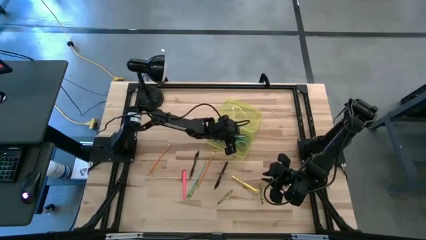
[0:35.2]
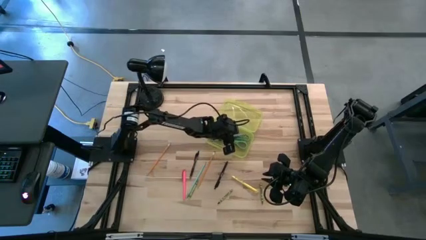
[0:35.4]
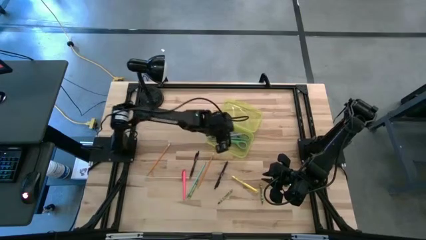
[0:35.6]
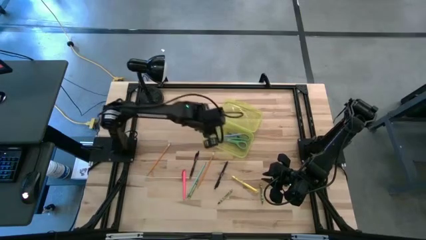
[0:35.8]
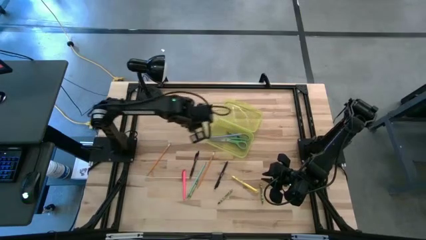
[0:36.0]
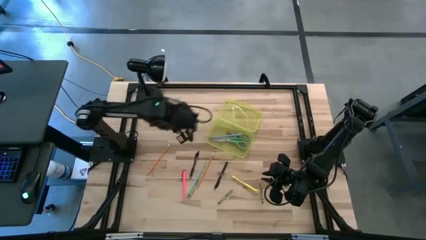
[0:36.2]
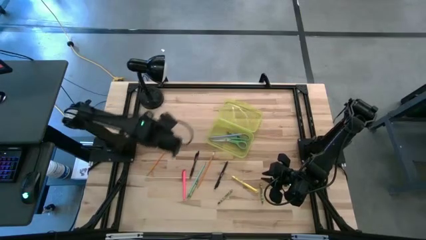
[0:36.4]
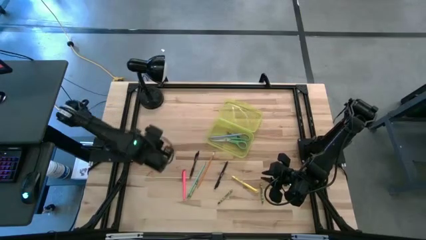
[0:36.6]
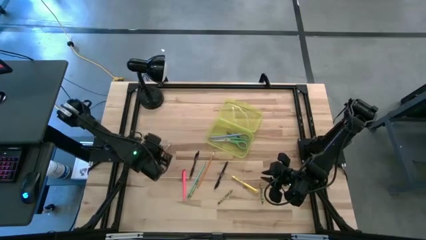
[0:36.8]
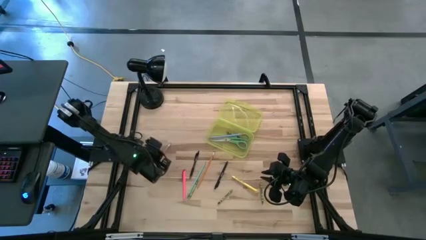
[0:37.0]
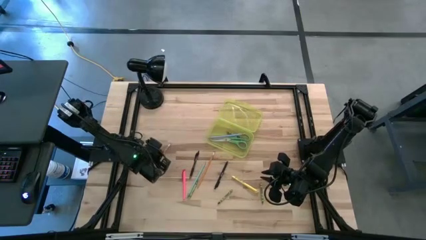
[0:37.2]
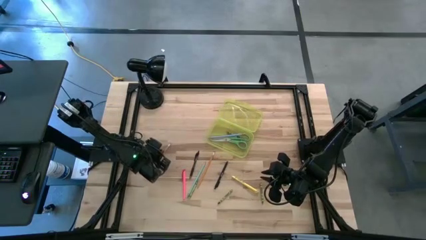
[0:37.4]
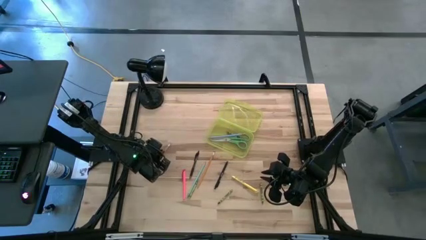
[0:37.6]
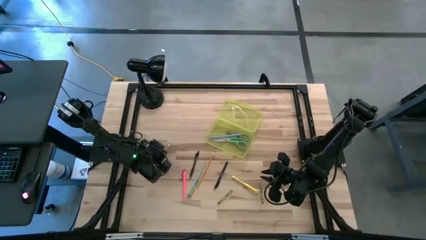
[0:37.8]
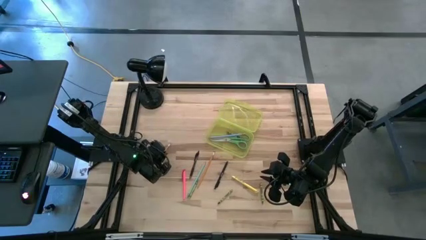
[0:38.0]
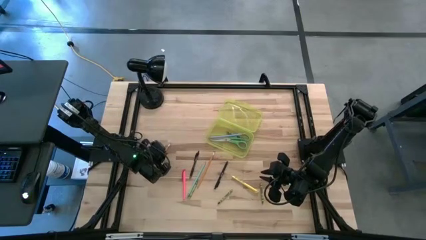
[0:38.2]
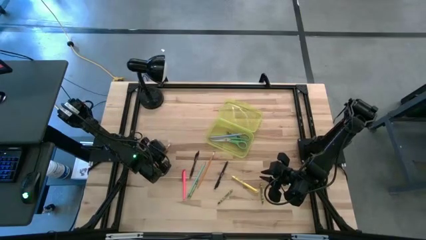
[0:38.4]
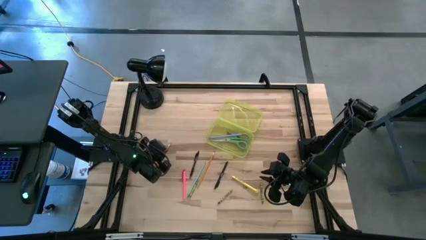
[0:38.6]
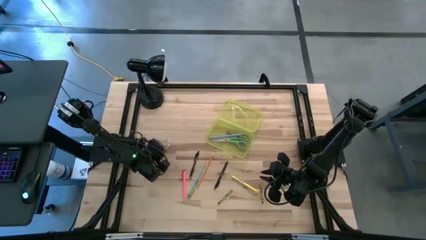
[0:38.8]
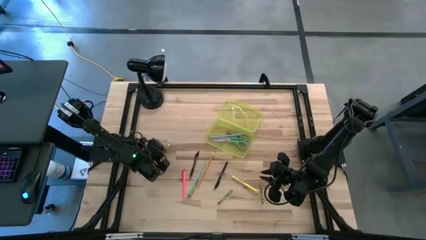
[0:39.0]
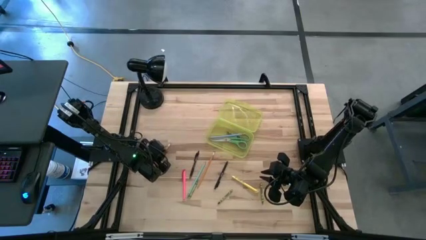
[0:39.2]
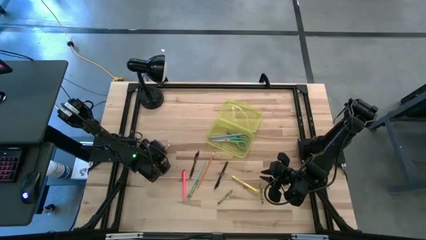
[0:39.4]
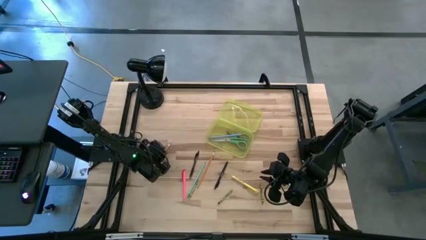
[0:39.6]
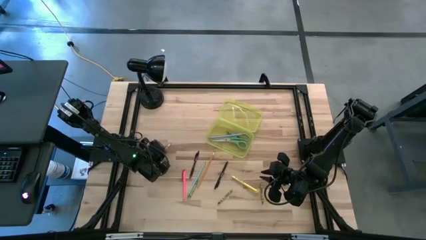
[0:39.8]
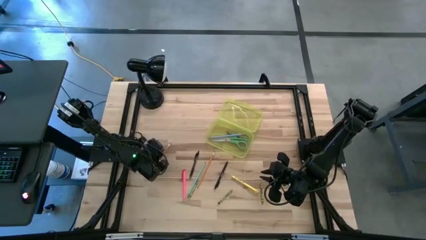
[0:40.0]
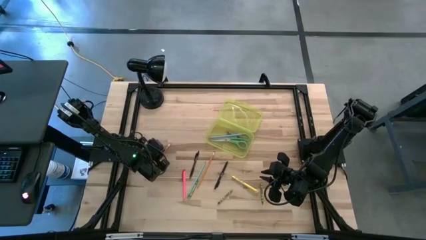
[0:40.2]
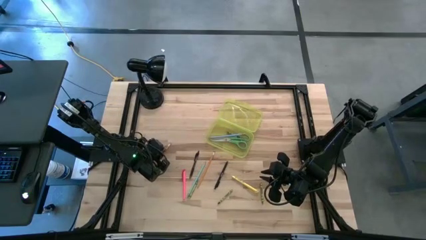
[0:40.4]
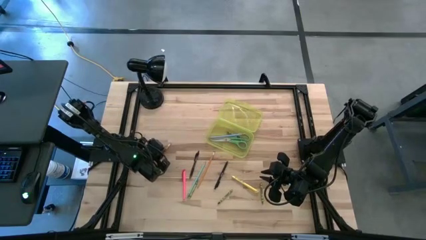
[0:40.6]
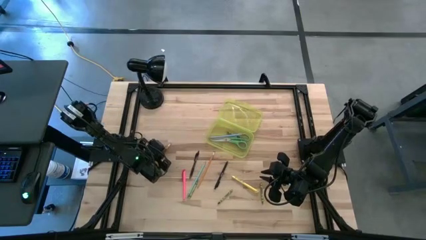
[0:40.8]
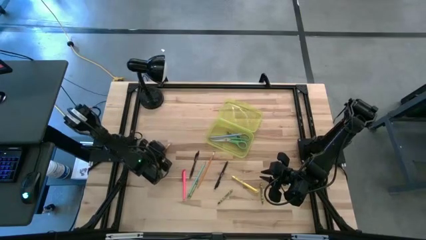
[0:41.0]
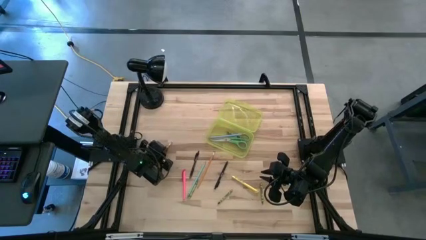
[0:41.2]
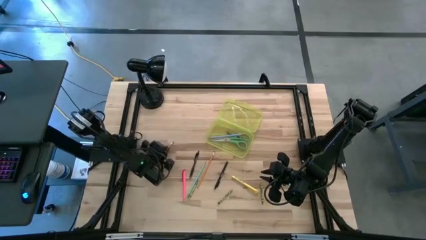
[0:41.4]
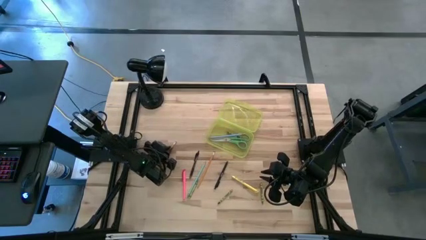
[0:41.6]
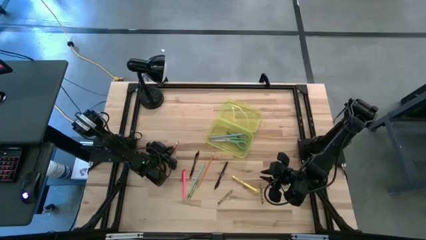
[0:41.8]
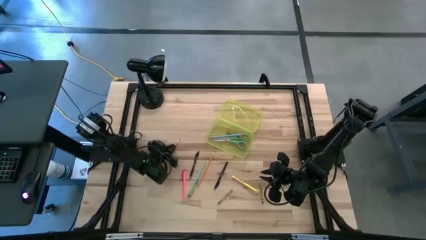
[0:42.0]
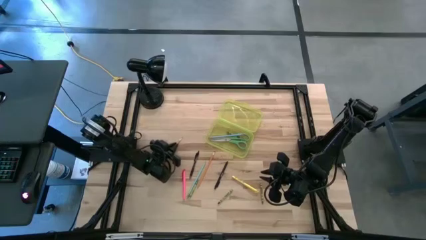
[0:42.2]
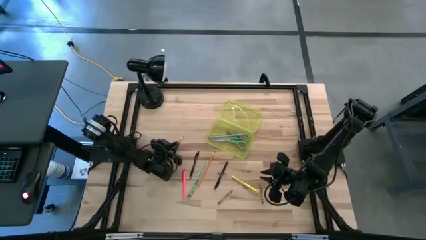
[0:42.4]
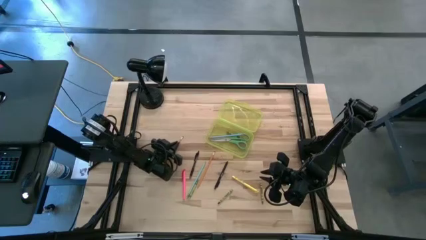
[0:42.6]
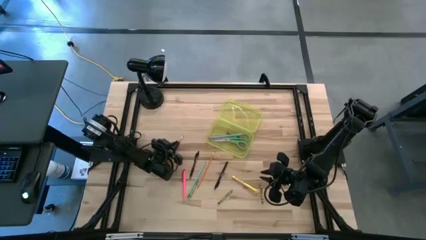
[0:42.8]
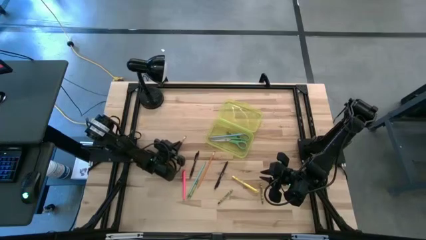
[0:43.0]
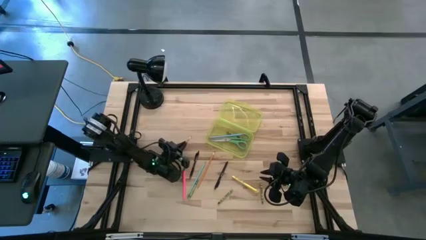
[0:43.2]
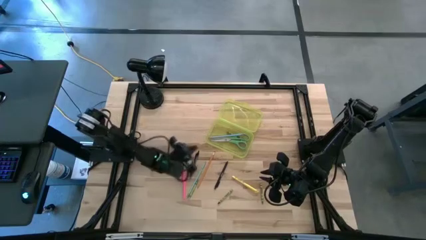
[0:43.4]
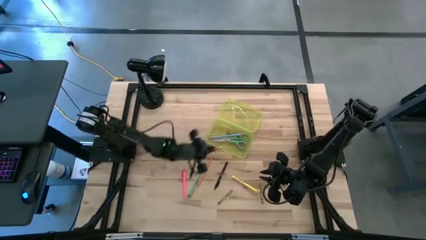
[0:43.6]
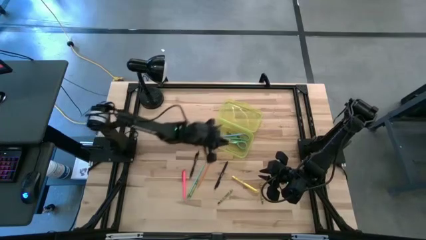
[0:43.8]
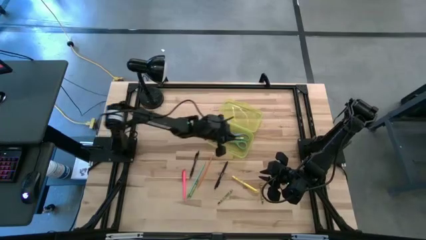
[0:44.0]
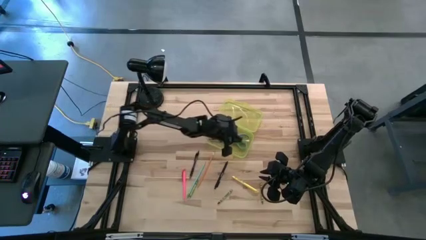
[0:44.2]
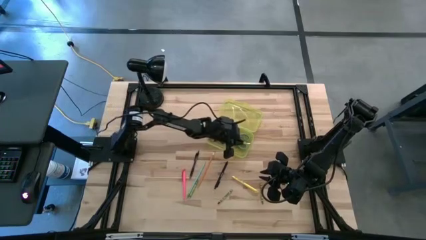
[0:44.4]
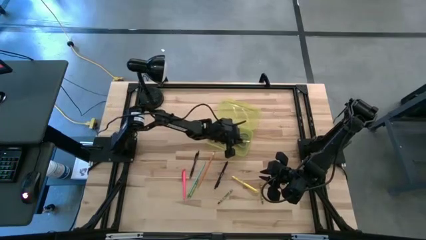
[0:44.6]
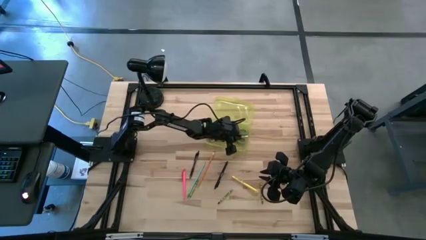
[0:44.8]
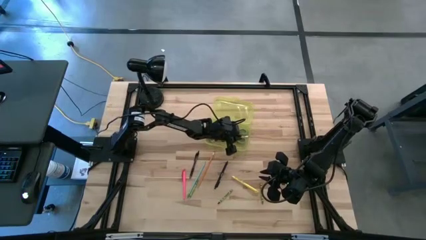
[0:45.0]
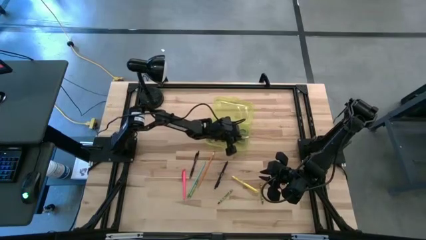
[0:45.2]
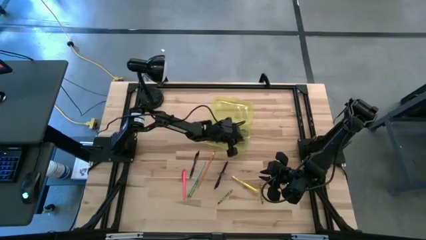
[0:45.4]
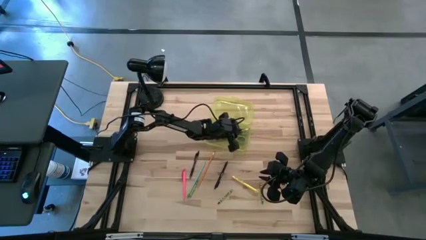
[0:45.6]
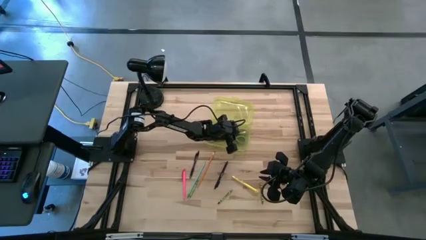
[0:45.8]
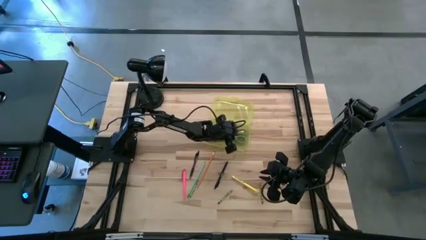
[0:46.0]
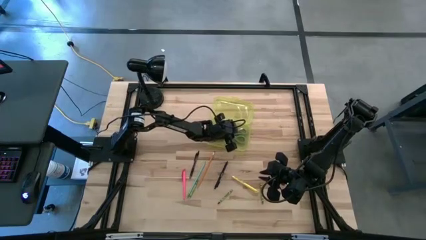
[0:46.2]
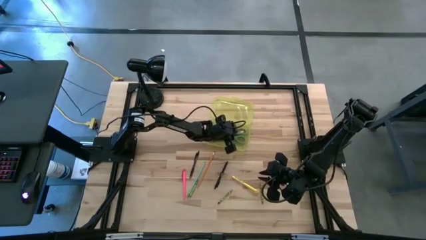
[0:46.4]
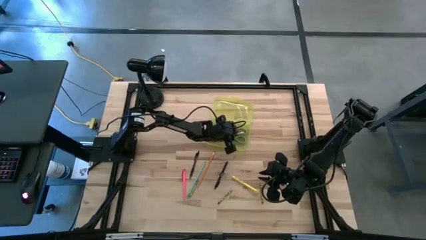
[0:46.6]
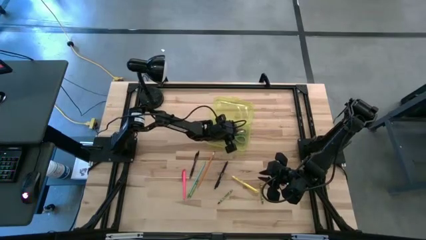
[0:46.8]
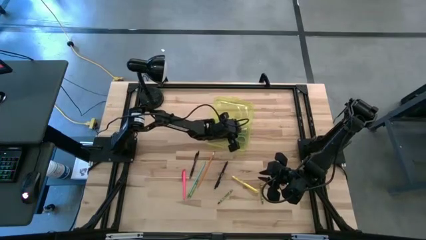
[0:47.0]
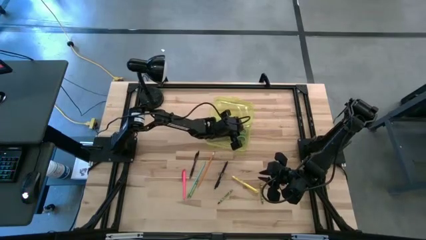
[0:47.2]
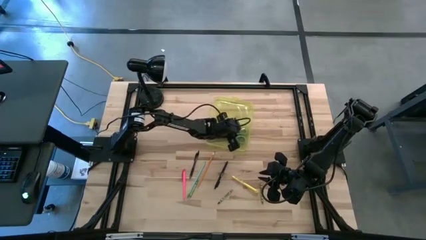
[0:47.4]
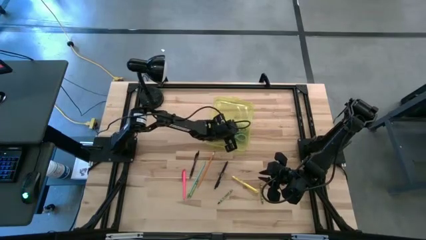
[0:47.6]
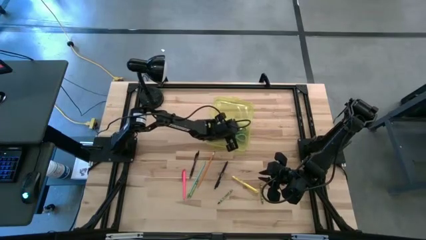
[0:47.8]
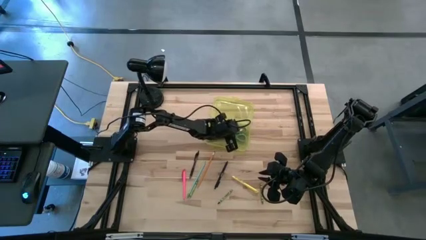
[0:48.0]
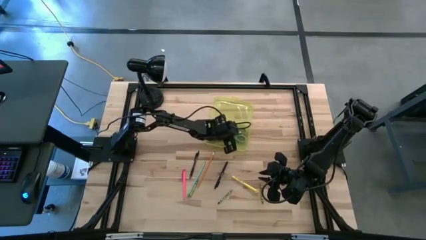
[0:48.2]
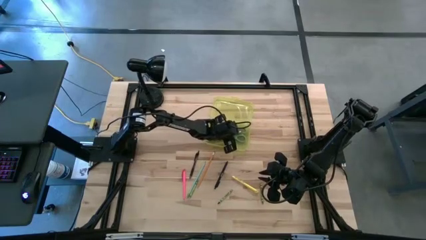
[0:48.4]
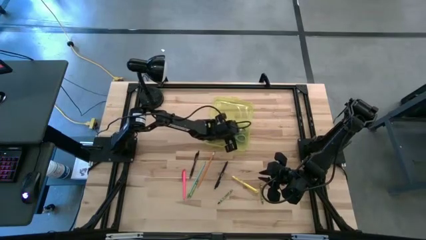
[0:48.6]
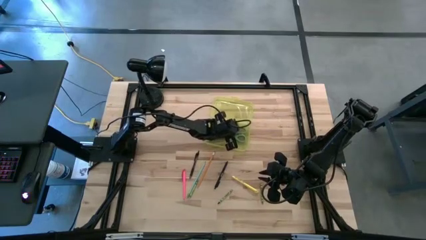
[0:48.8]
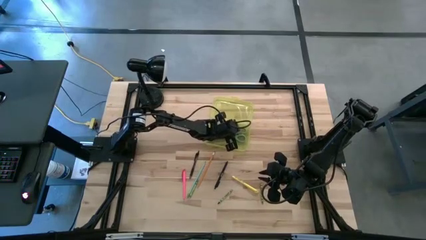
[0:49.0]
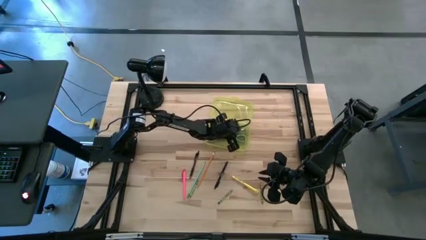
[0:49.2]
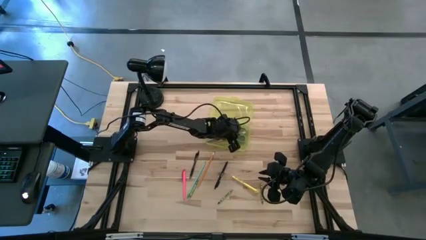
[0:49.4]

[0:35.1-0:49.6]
Task: Pick & place school supplies into a supply box
Put the left orange pencil into the yellow supply box

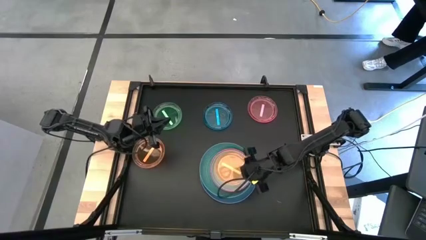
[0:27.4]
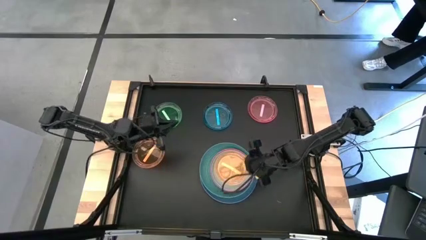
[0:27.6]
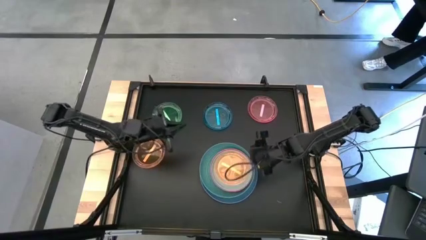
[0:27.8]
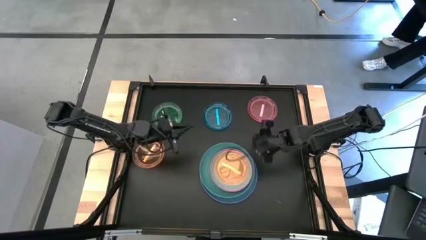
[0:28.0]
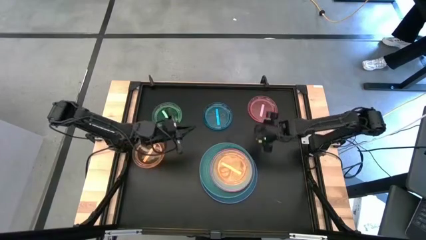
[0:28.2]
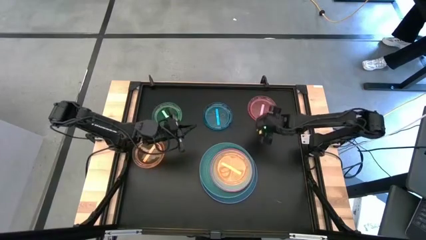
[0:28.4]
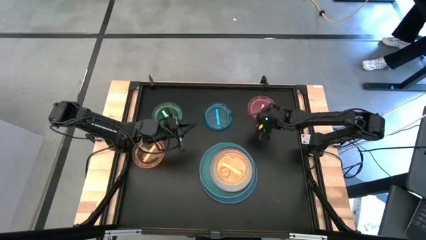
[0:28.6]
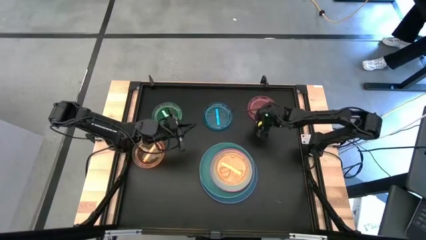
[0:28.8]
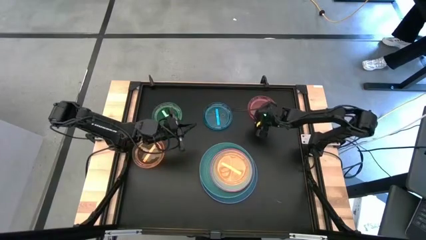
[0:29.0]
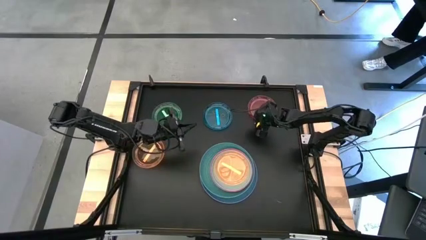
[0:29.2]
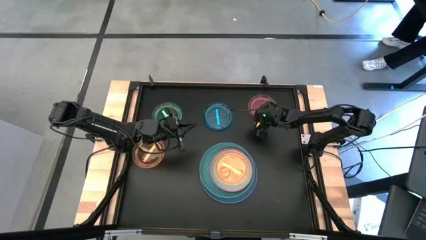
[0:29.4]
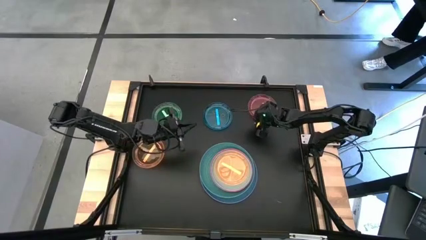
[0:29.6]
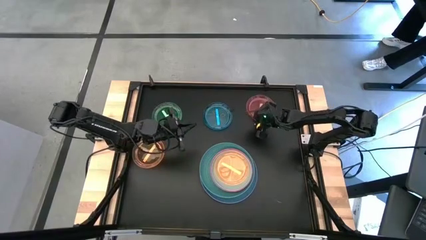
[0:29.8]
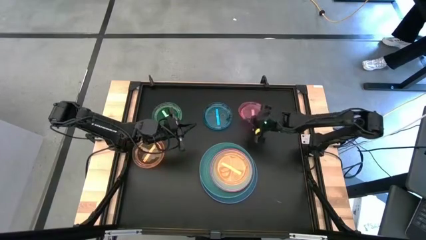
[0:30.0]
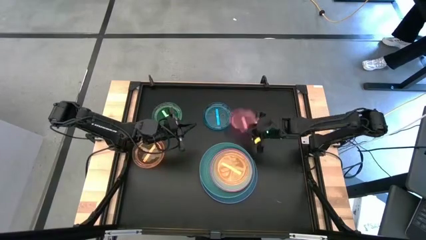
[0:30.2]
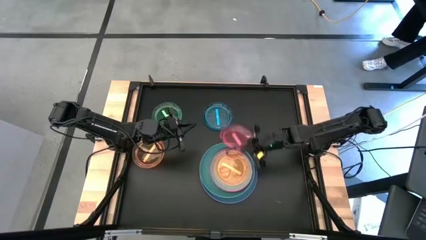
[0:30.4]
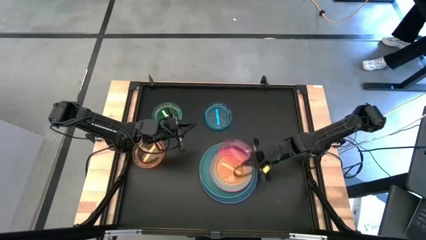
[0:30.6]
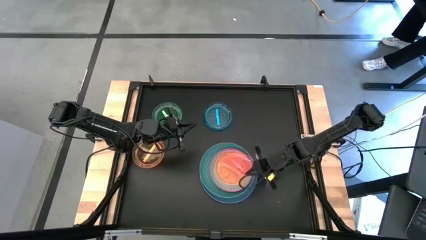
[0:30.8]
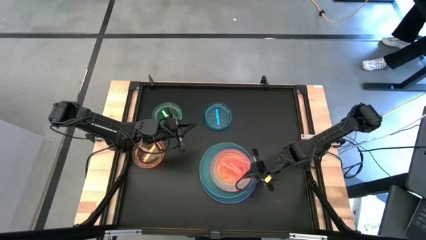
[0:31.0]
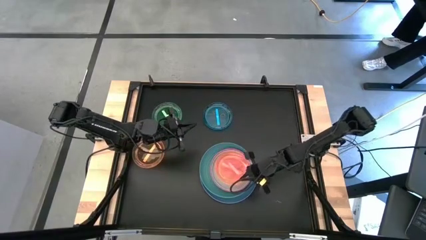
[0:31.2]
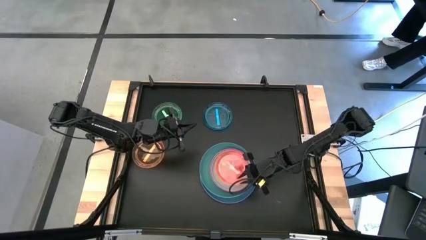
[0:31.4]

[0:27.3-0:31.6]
Task: Stack plastic plates
Stack the pink transparent plate on top of the orange transparent plate
